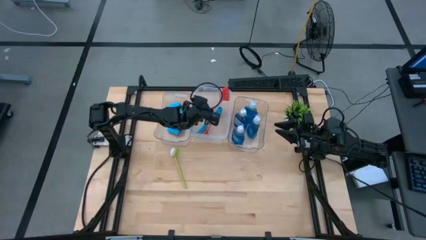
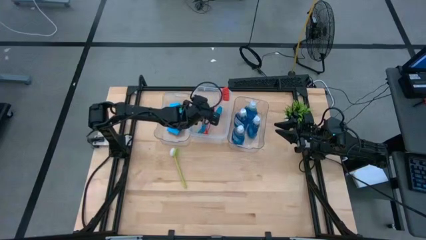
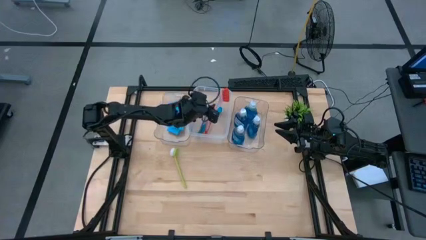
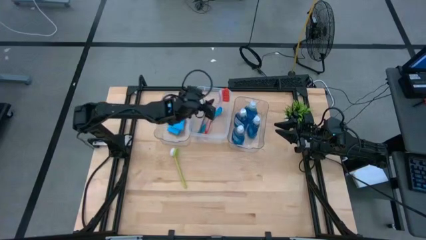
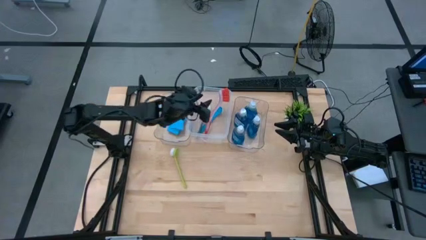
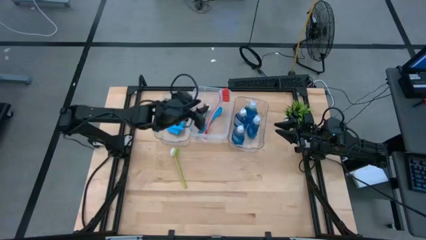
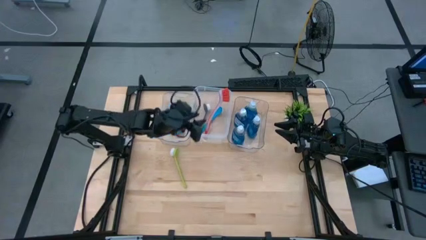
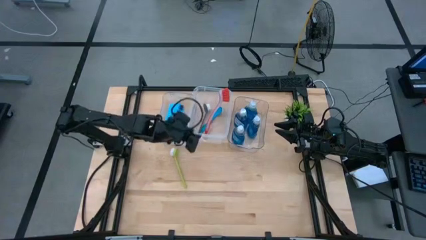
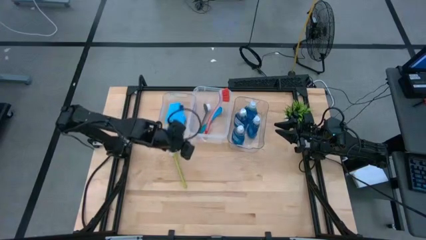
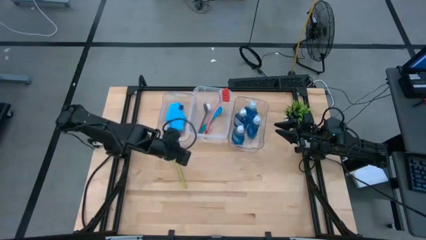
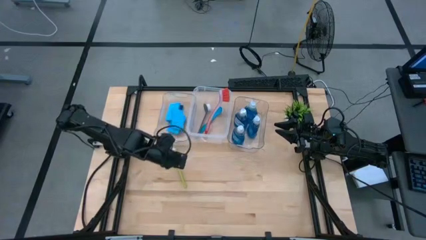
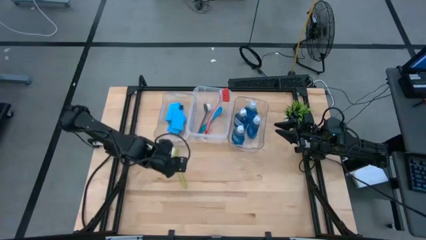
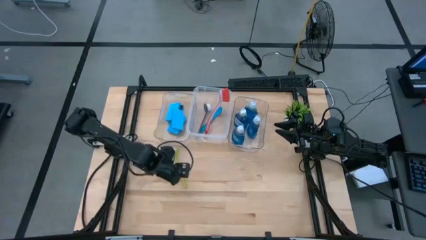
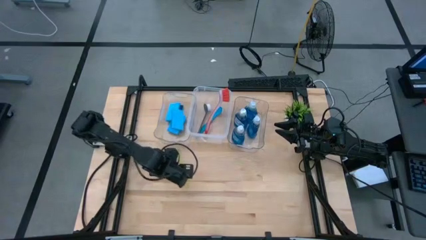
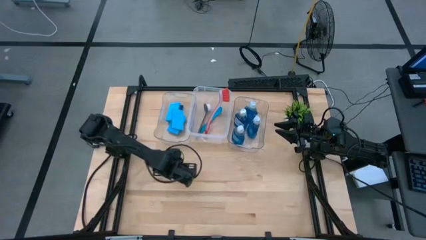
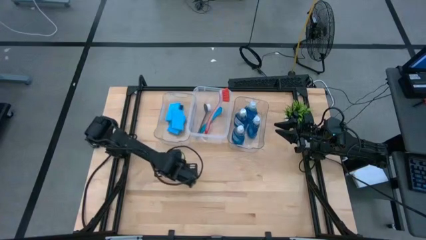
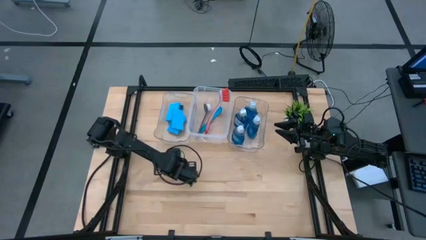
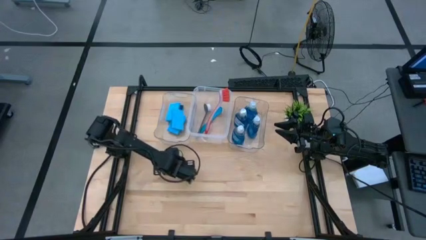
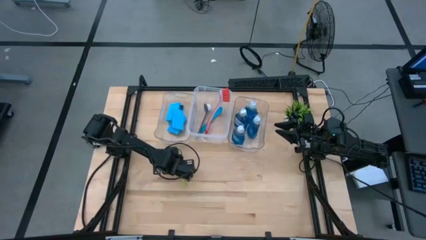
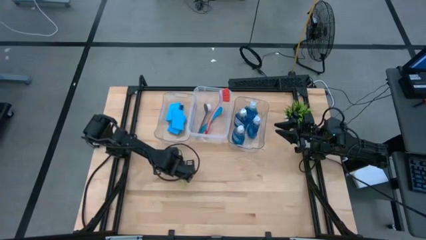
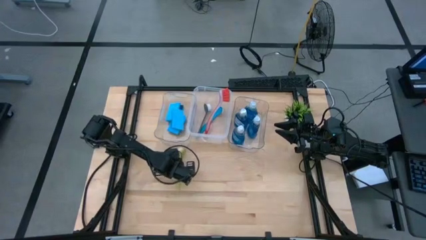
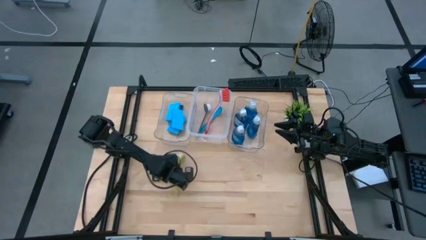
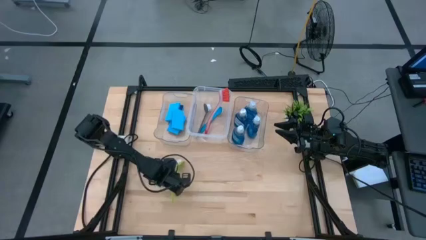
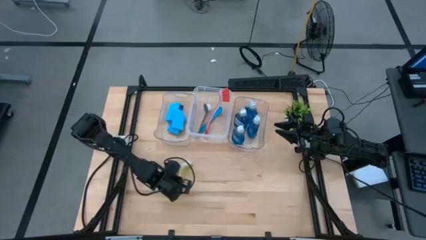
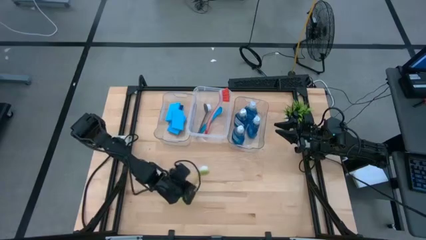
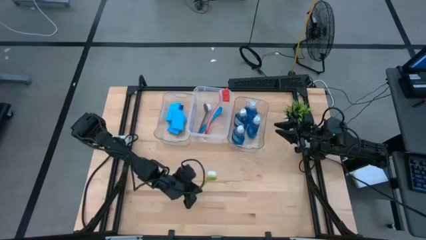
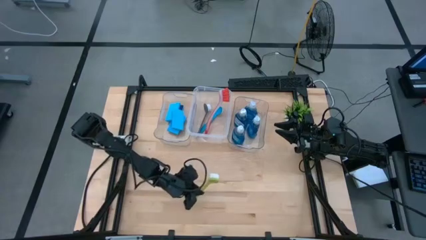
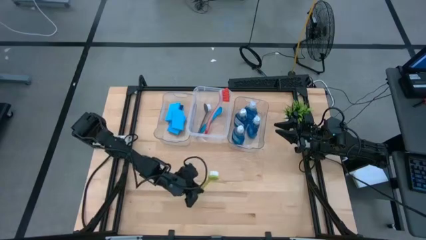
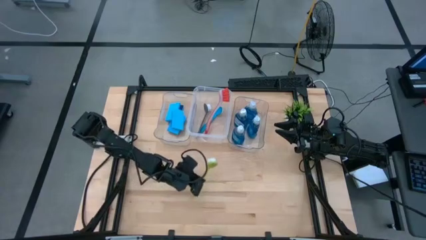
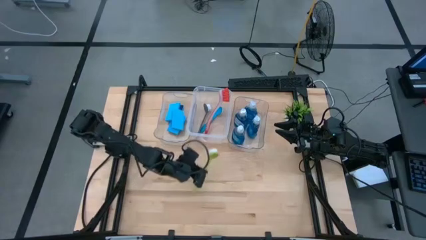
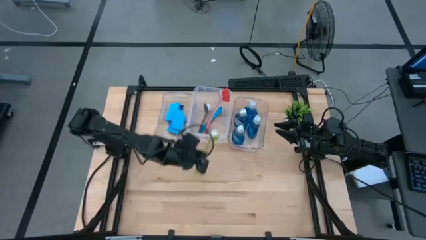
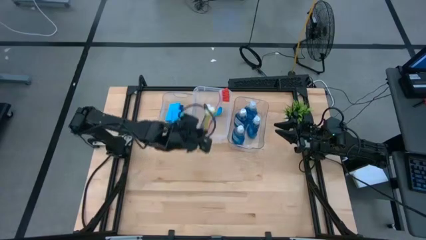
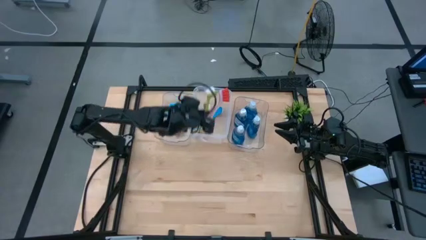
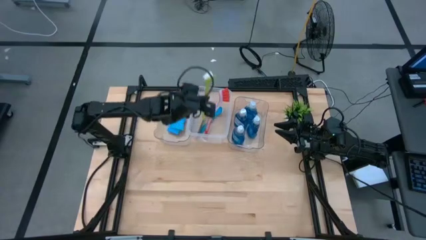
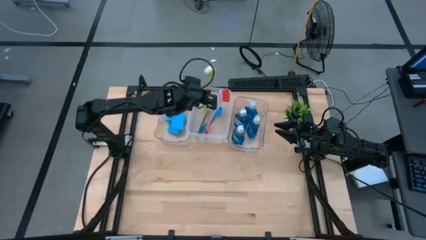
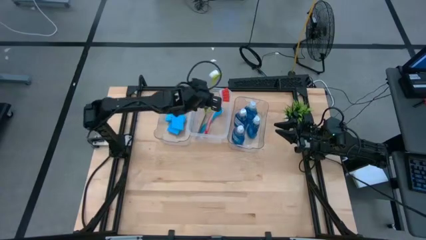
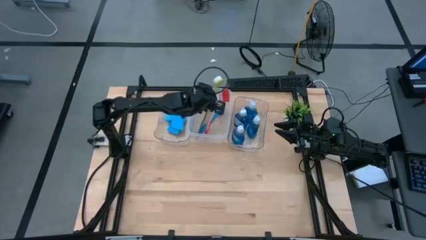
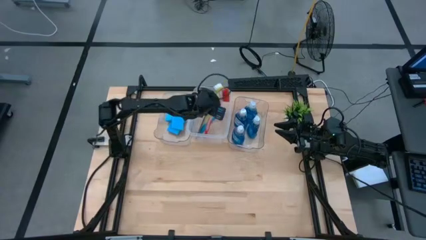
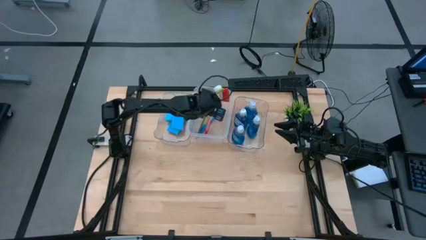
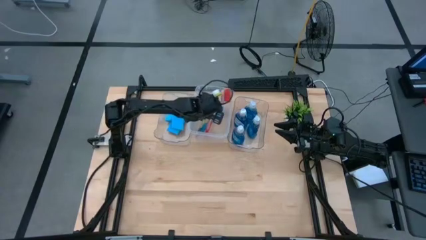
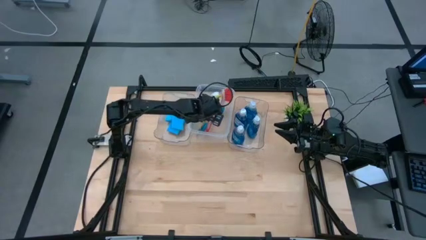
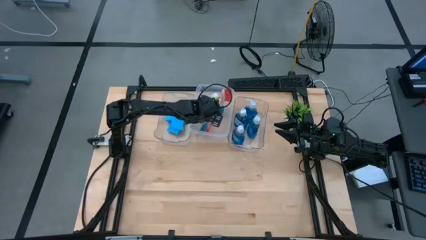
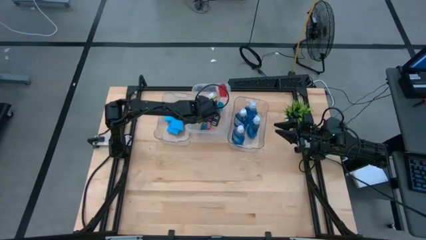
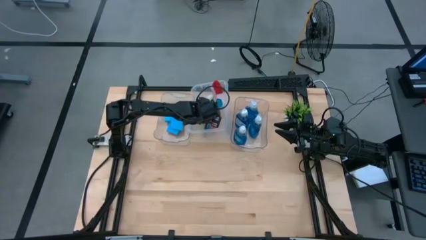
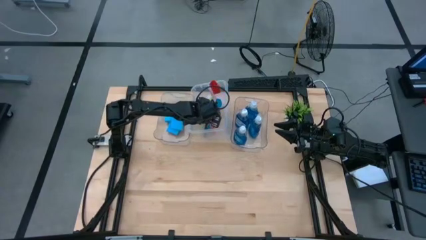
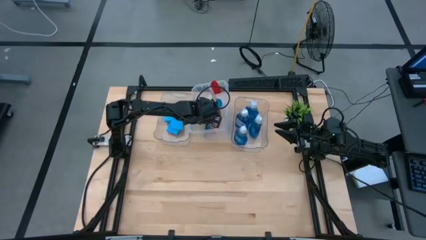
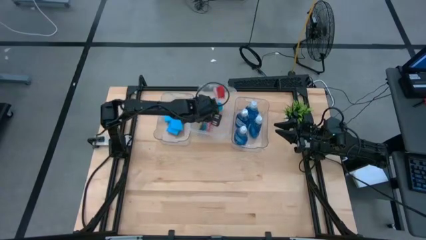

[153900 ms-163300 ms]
Task: Pick & Place Kitchen Sink Supplies
Put the green dish brush into the middle transparent bin

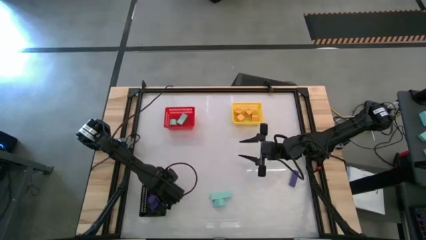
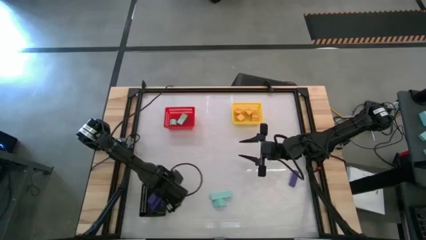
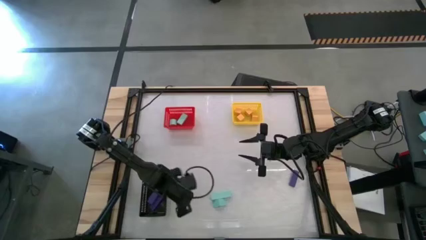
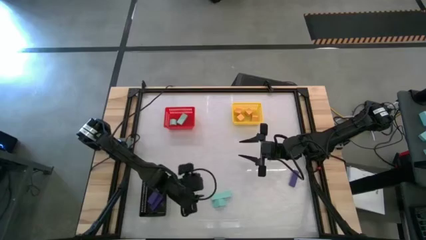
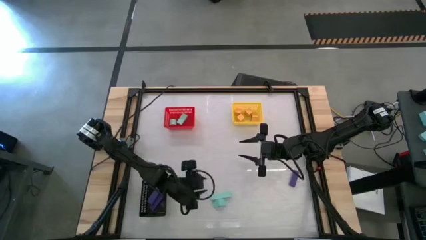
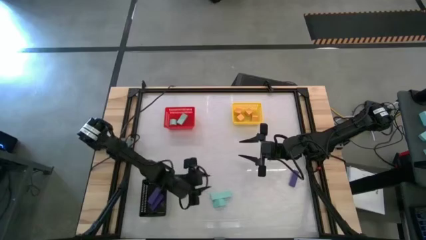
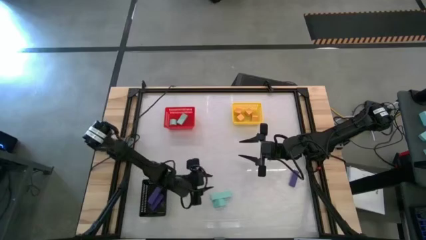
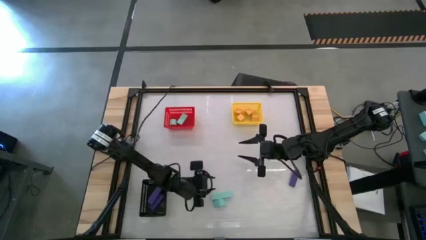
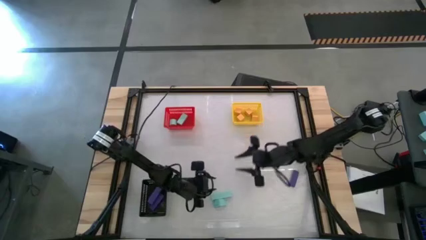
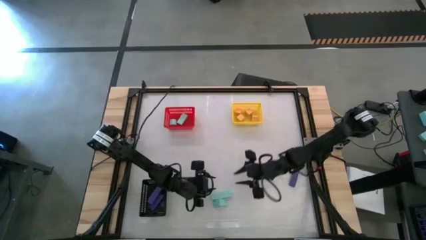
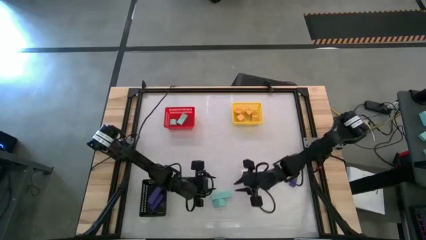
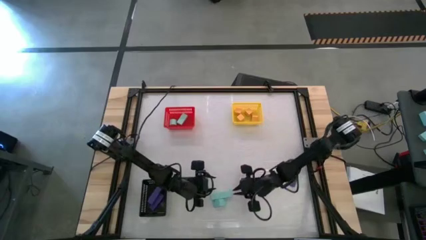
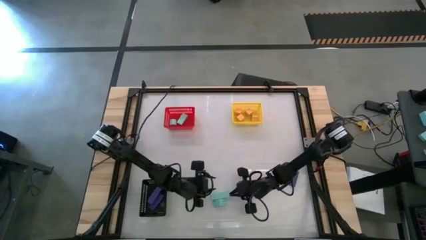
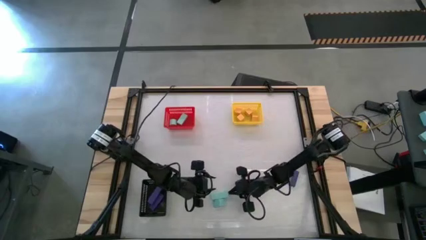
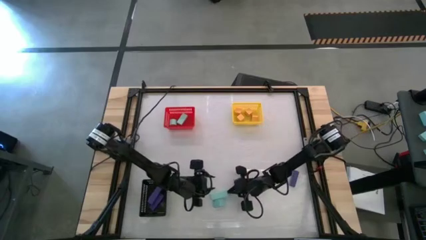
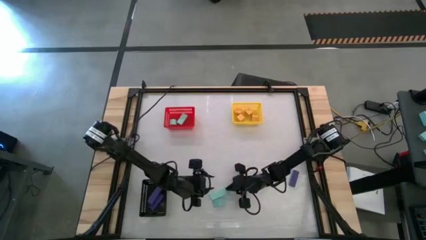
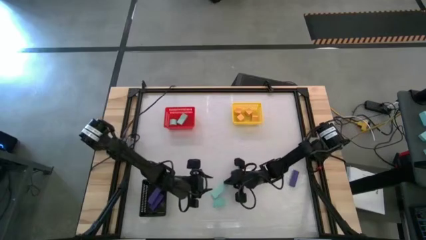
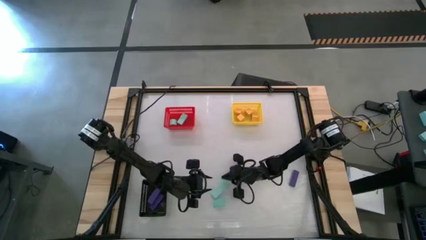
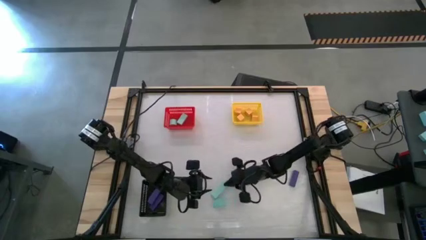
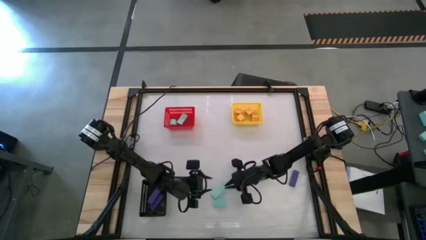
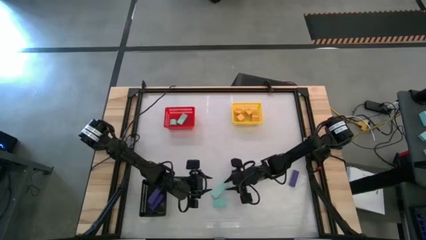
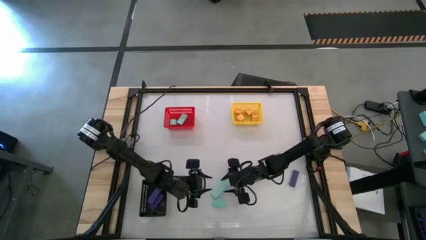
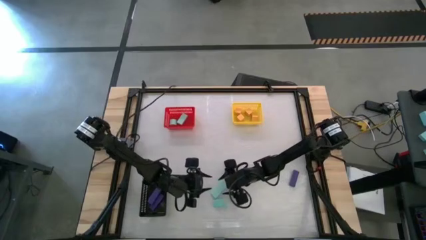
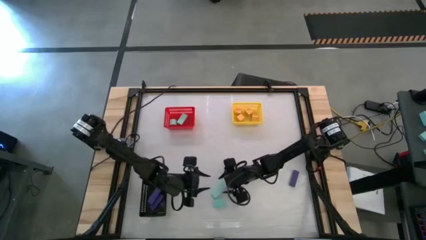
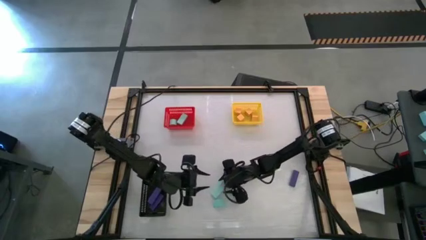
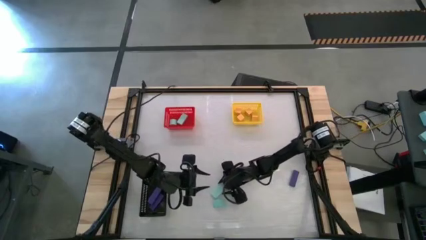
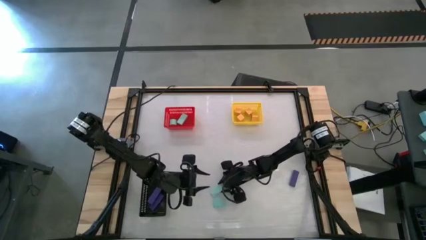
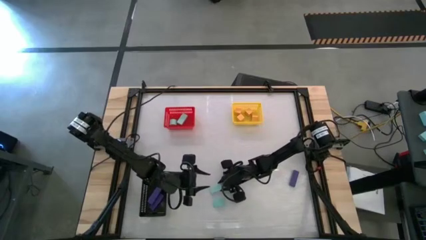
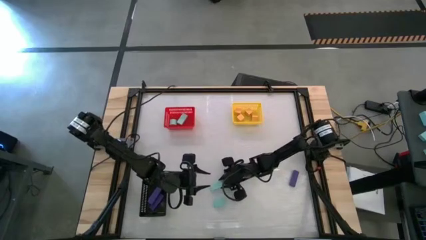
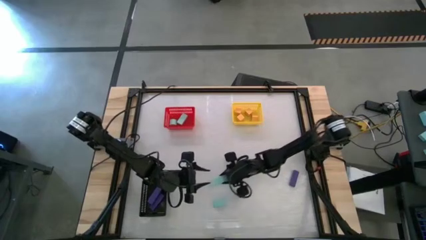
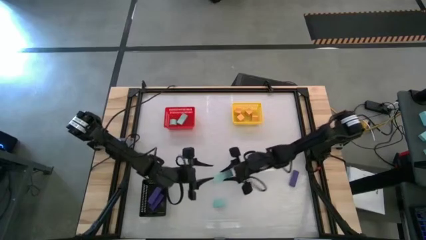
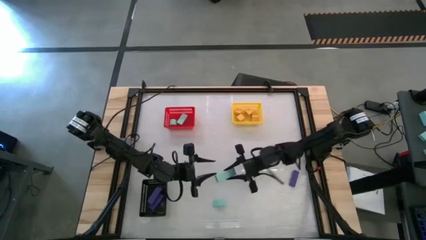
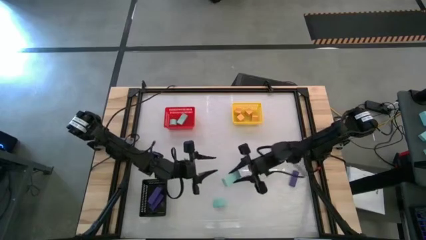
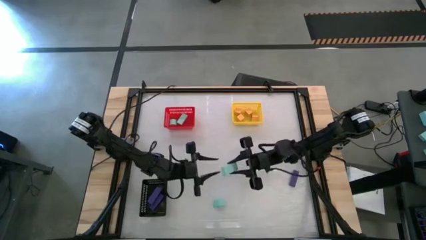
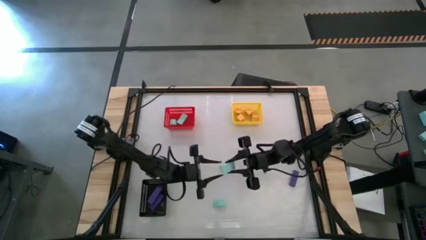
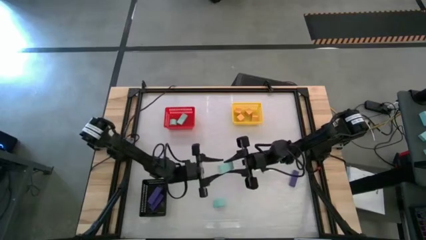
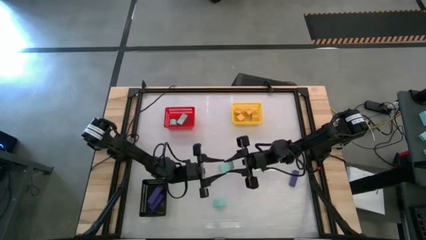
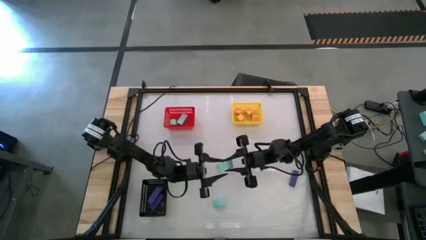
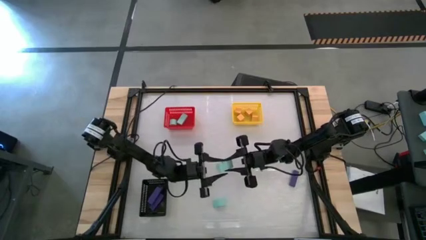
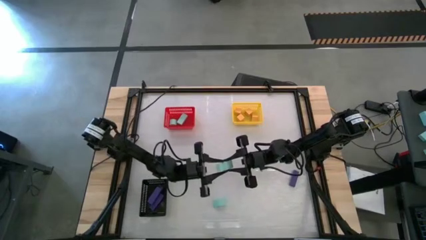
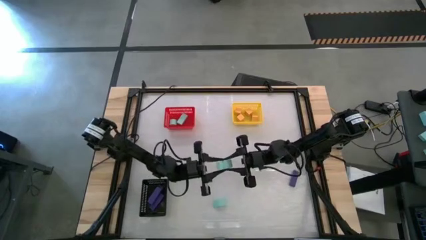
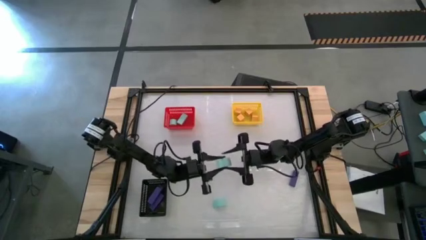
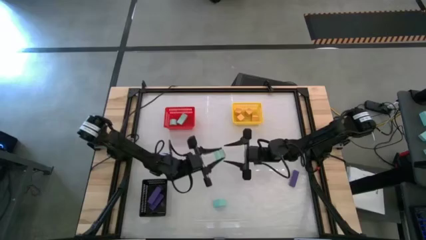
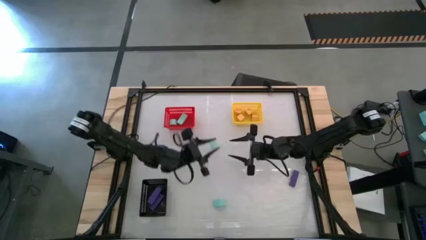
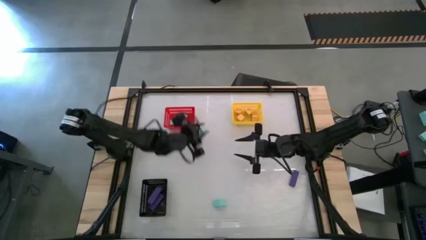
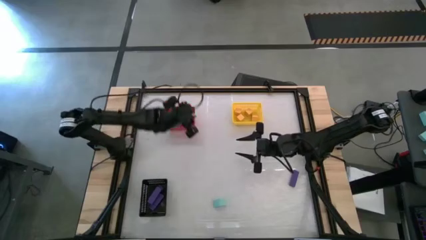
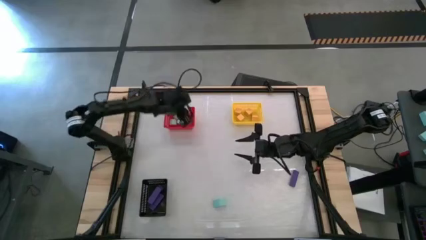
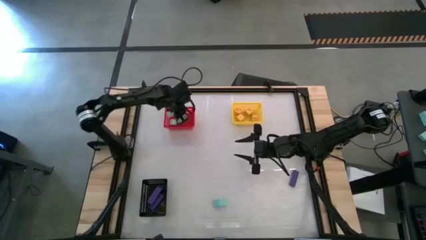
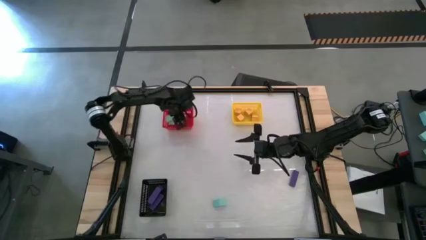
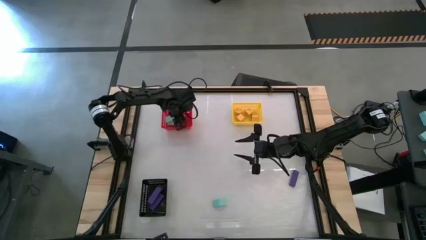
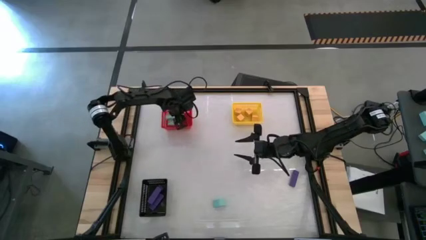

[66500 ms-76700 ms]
Task: Sort & place blocks by color
Put the light blue block into the red bin
